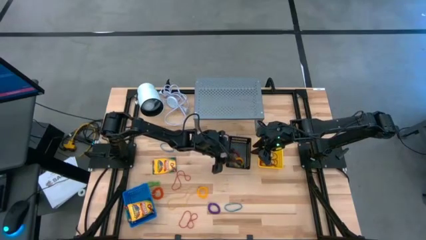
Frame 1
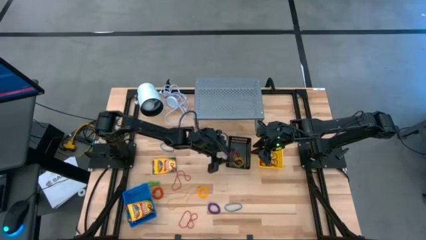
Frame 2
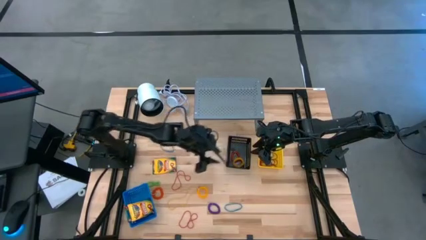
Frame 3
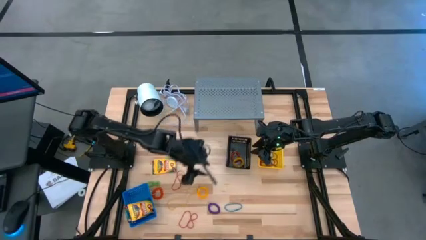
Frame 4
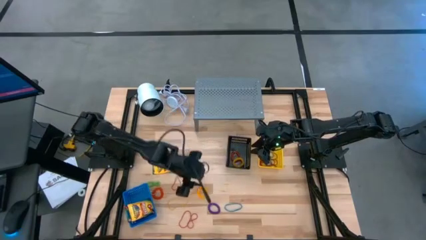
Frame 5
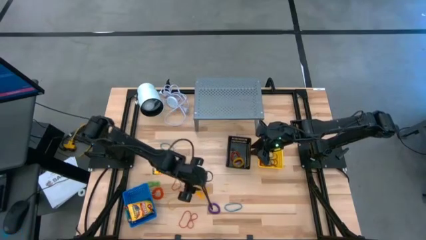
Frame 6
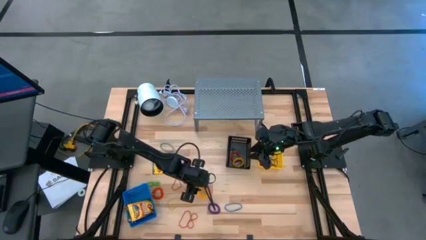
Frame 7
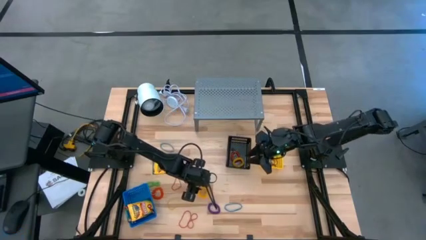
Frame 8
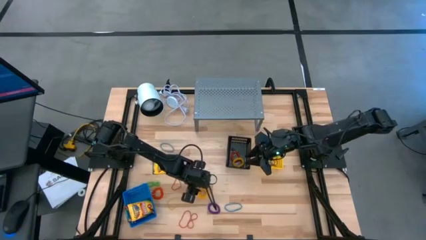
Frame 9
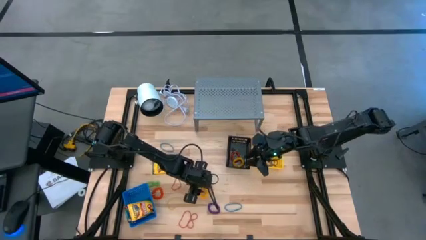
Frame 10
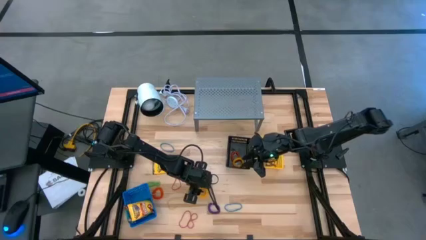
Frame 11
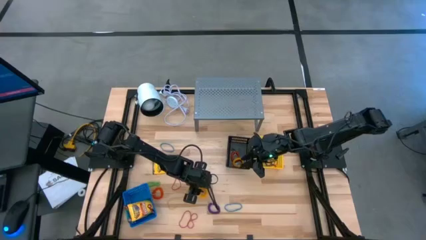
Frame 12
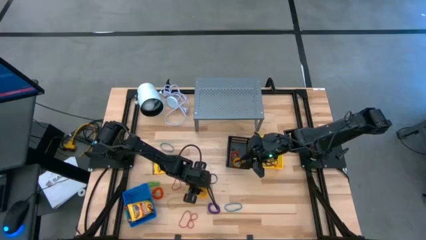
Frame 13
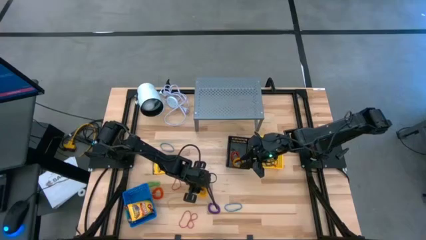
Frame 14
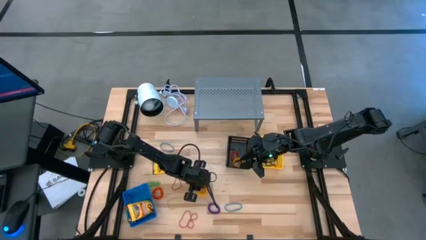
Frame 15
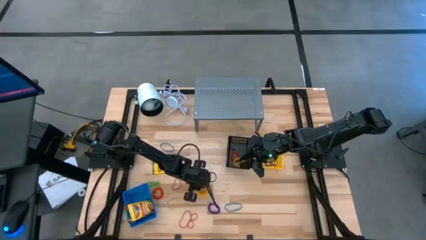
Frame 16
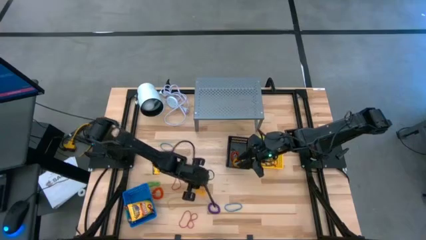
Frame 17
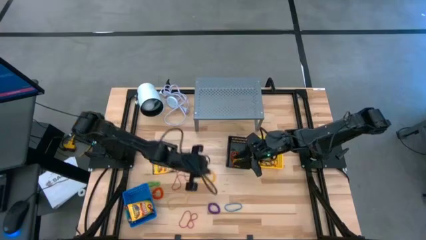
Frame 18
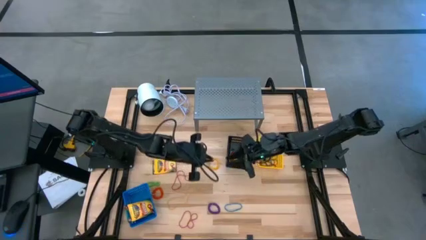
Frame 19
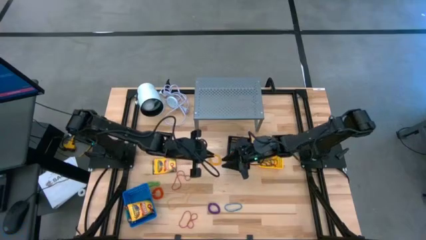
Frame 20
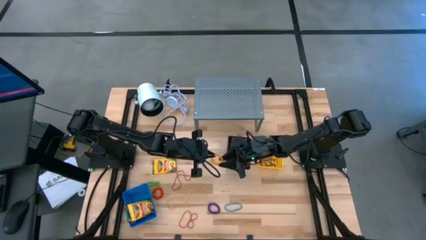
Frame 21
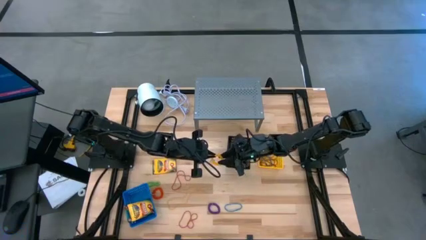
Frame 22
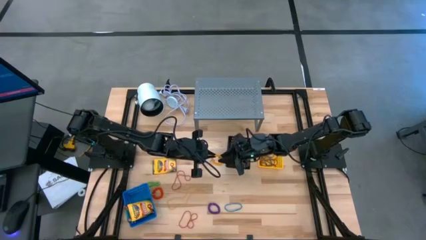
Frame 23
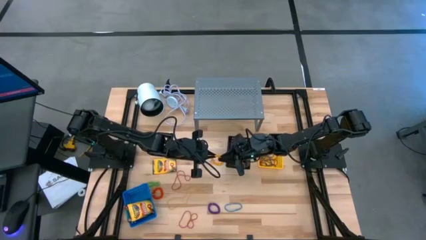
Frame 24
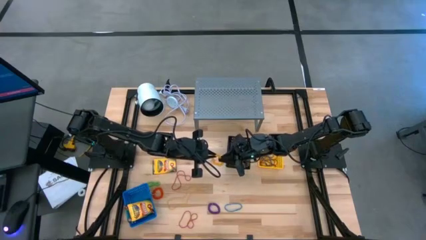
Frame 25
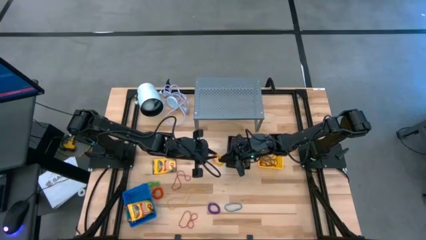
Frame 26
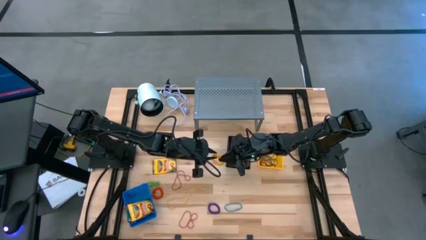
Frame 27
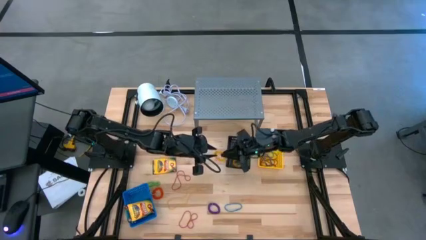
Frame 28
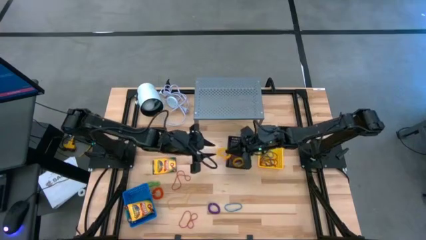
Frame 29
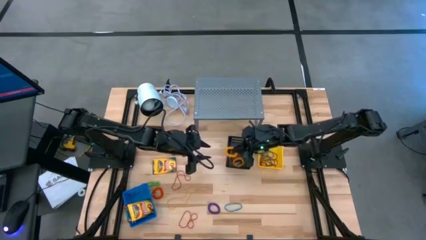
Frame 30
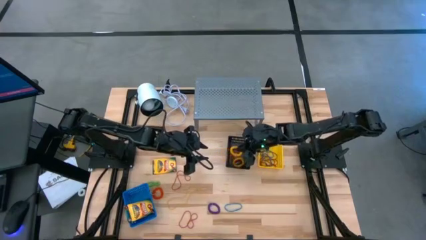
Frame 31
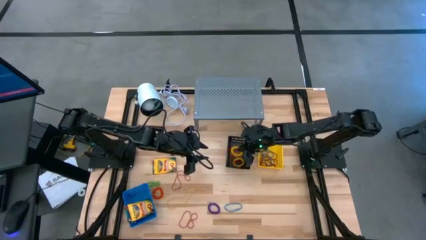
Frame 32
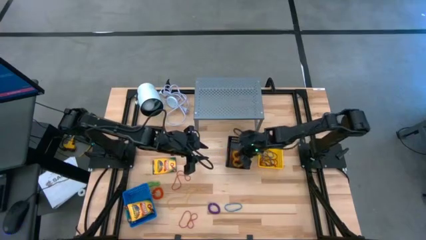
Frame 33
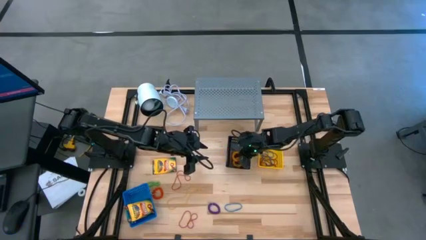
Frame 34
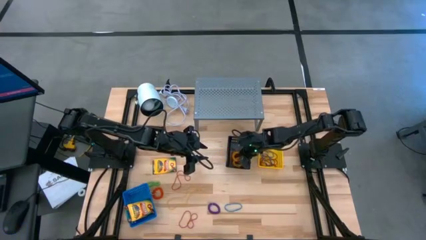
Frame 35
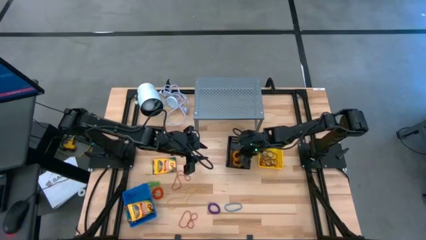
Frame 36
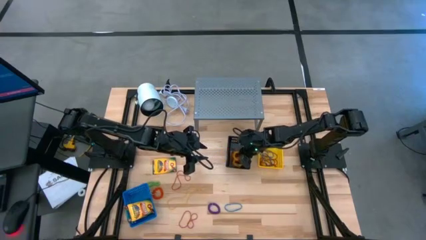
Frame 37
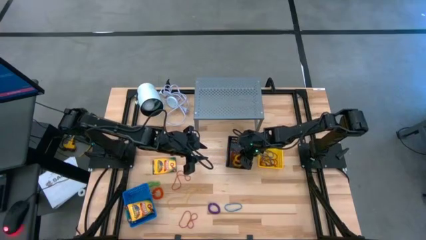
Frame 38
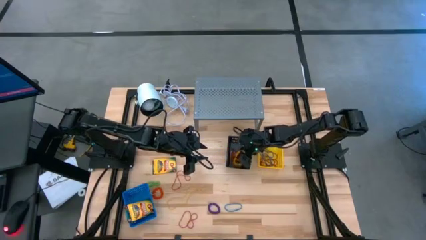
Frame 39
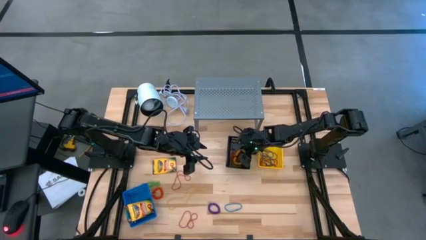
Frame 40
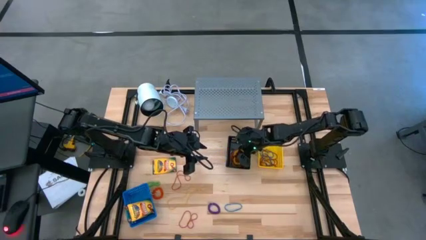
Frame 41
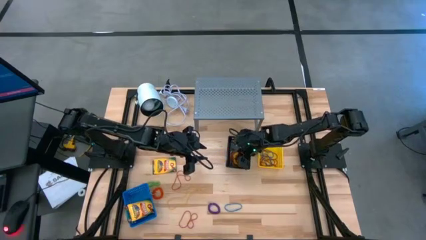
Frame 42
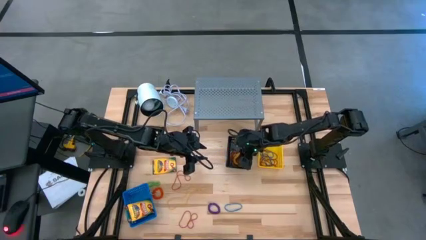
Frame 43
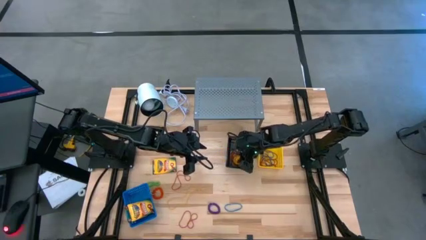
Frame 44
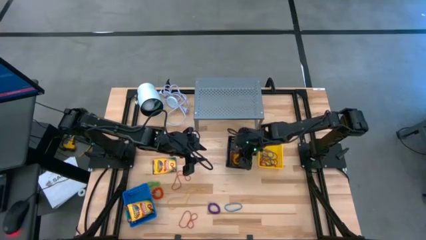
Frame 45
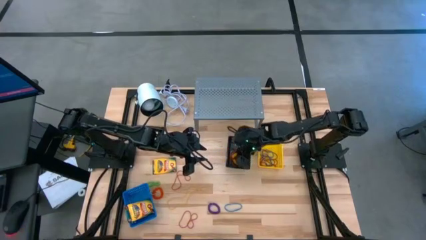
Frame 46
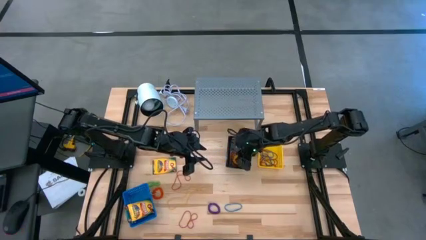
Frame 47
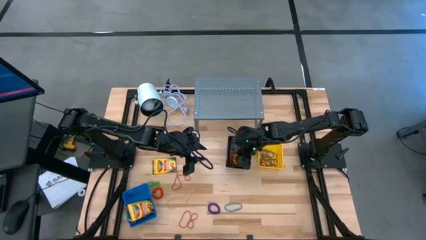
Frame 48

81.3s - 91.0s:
Task: Pick & Place Office Desk Supplies
Put the yellow spring keychain into the black basket

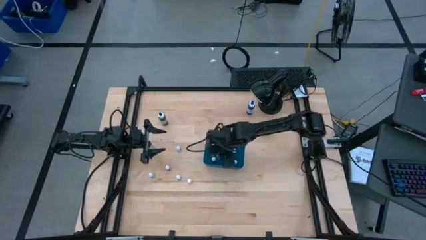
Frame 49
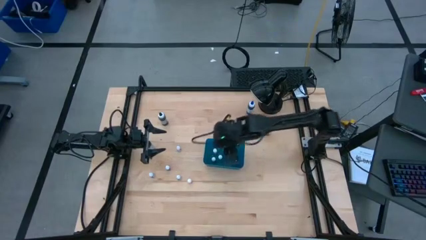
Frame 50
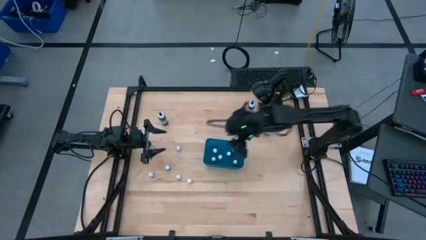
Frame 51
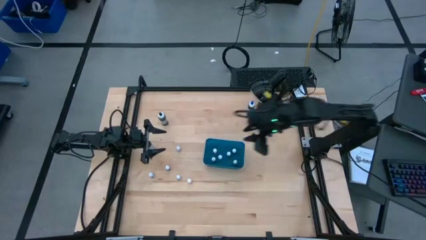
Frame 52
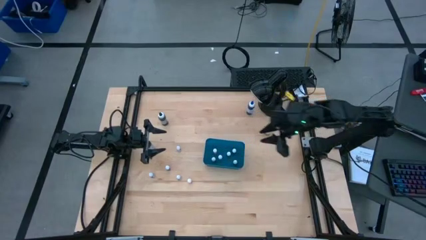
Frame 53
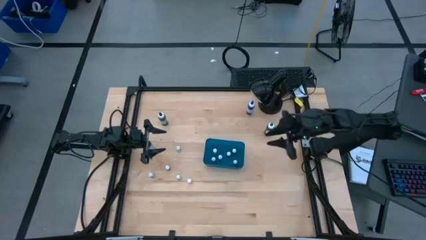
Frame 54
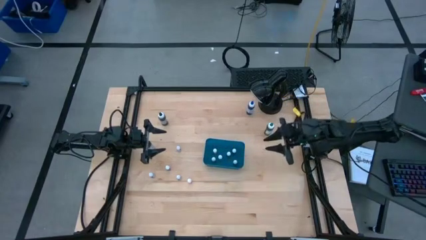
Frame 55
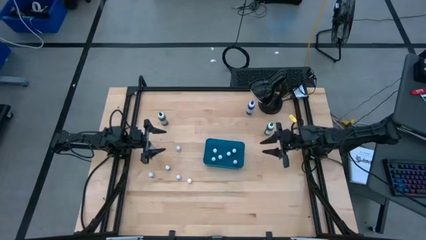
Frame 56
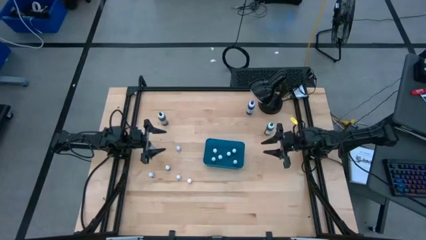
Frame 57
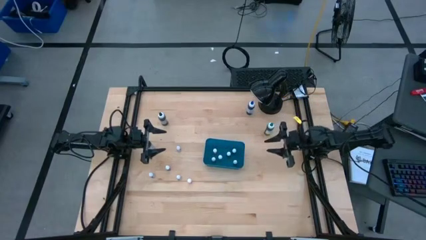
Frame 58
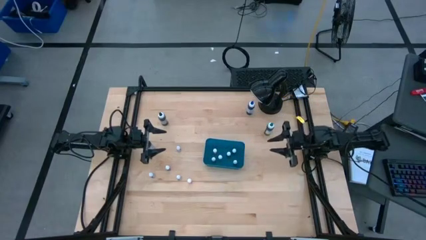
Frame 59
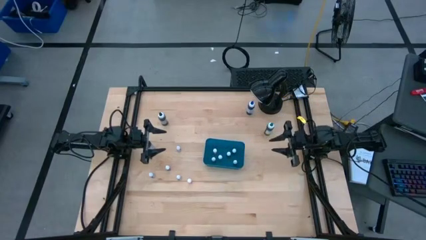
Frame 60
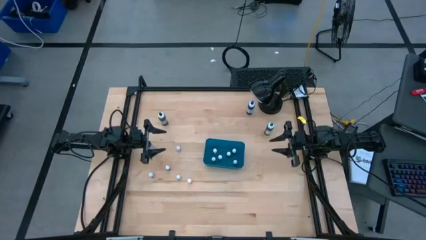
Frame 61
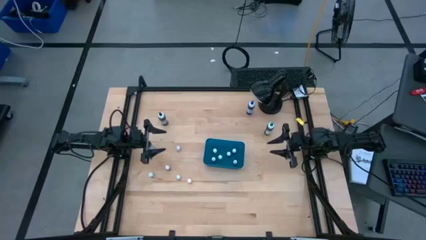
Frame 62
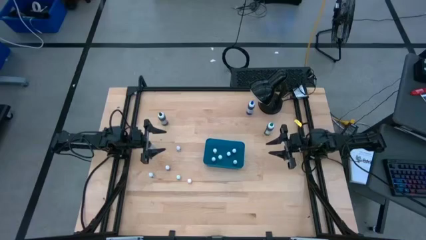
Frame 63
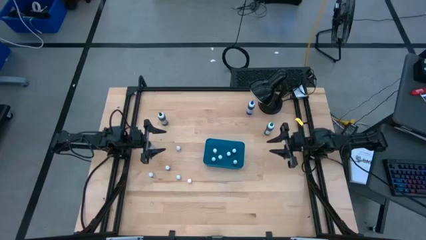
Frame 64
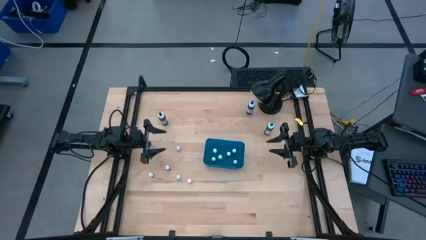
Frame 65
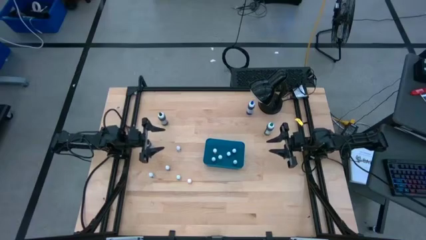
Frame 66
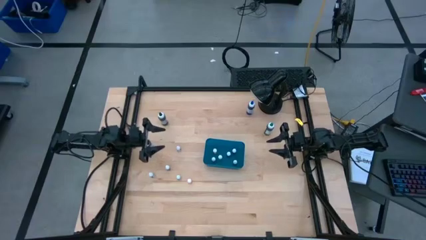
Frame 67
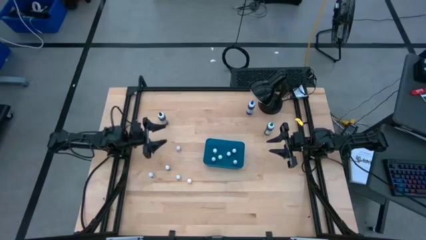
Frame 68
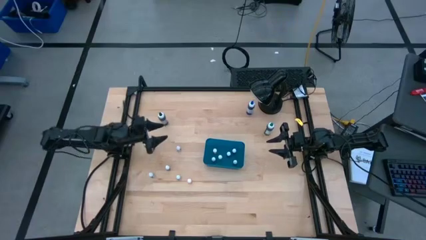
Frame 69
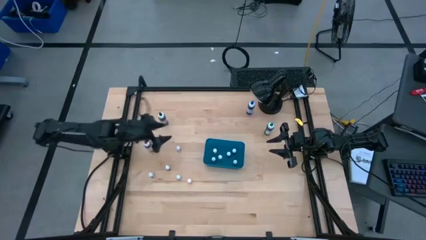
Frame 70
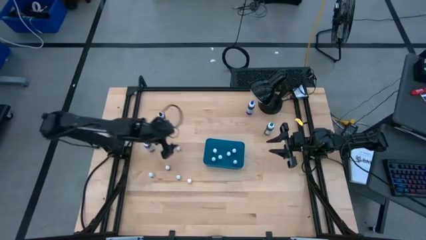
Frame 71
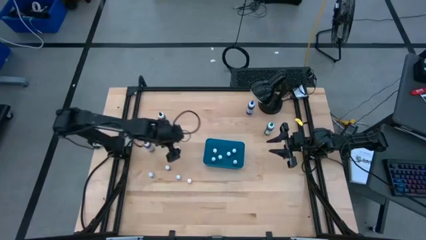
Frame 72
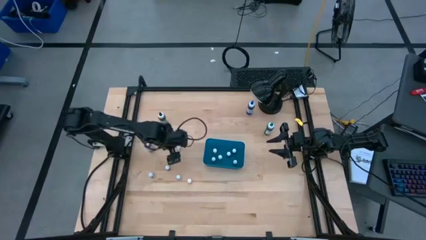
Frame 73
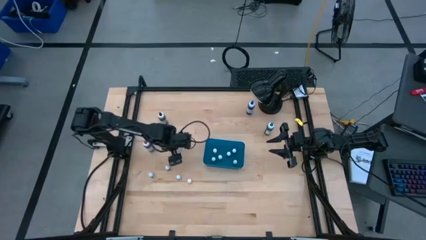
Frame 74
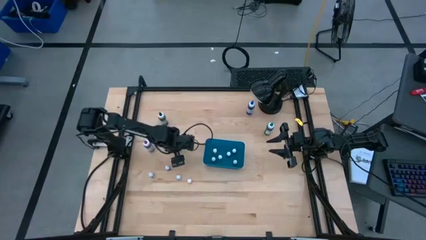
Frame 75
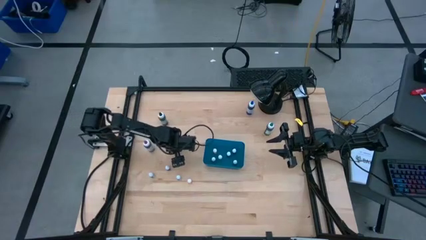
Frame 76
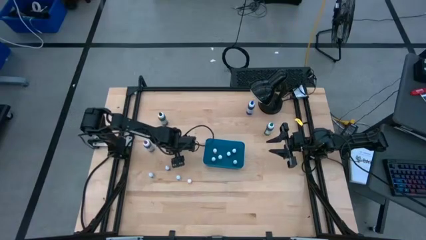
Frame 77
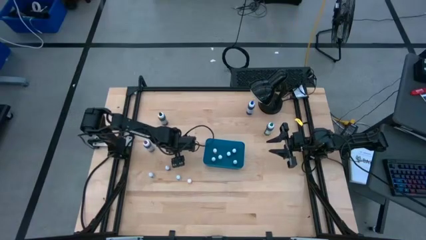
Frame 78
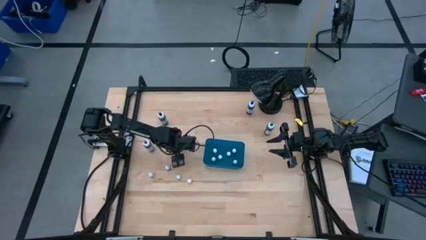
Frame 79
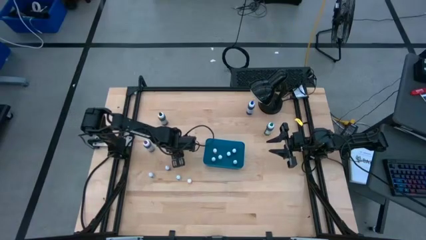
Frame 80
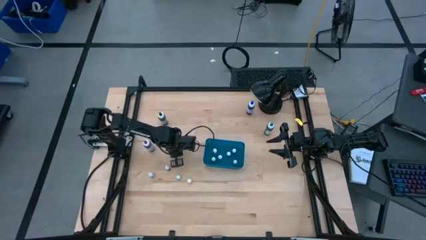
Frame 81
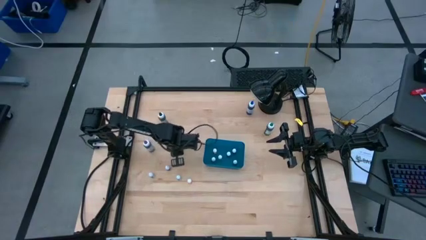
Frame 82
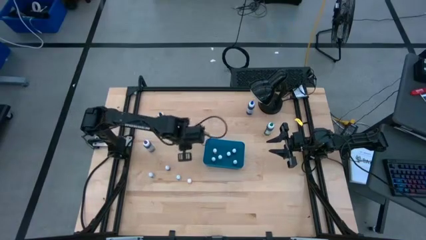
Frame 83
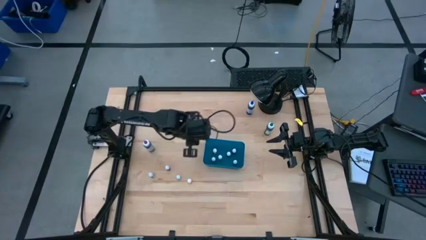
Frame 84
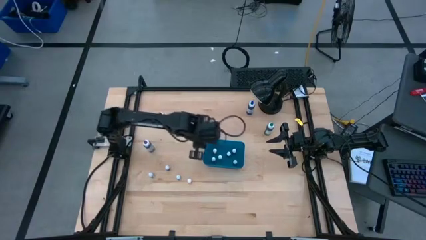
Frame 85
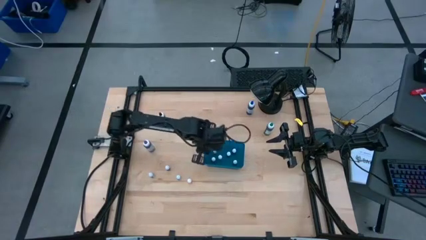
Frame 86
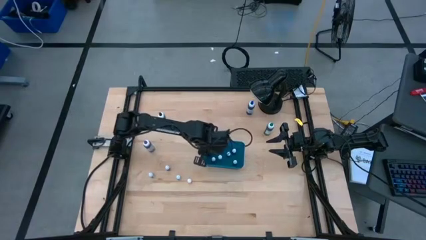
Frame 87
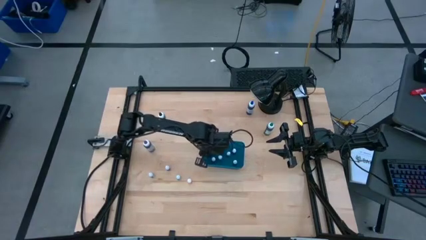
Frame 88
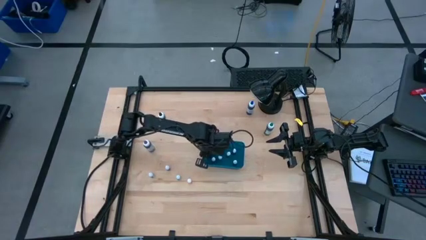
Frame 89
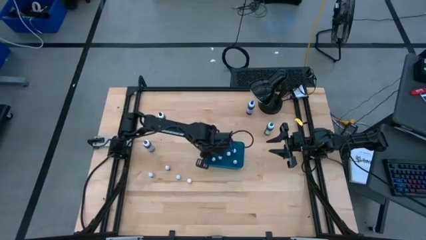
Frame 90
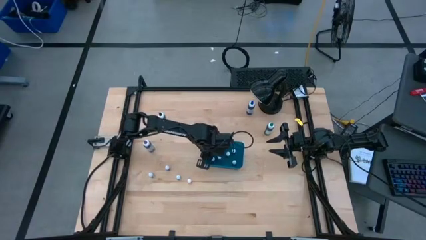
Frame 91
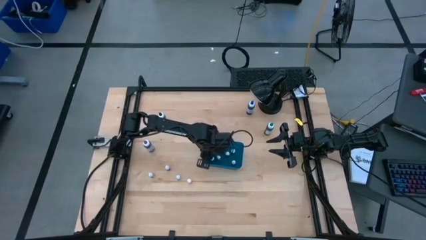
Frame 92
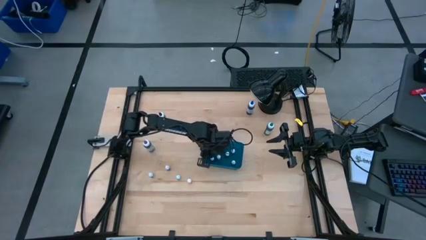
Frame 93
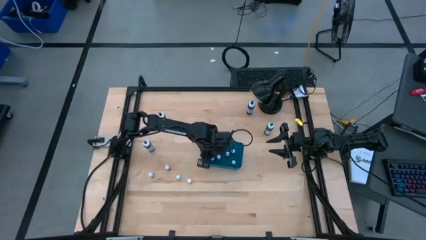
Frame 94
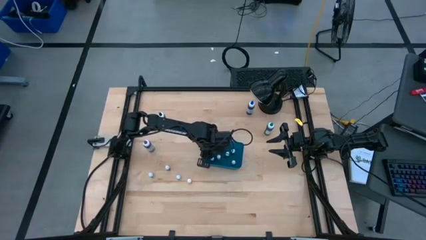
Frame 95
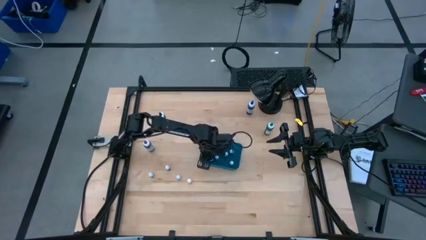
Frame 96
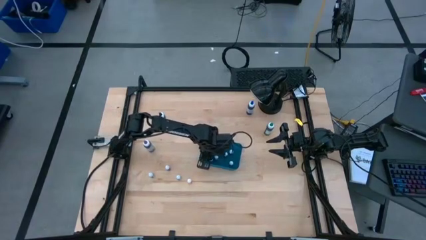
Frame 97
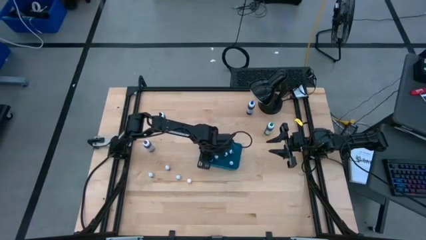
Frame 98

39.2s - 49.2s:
Task: Pick & Place food coloring
Put the small black food coloring bottle into the blue bin
